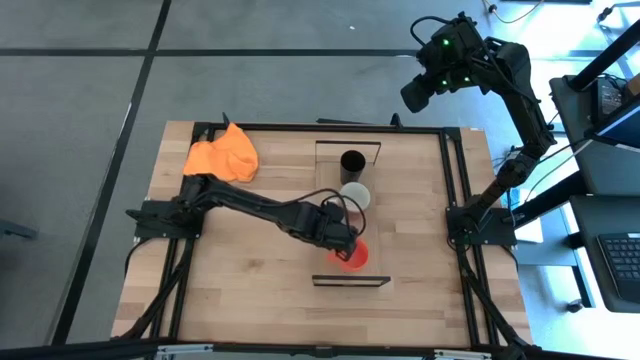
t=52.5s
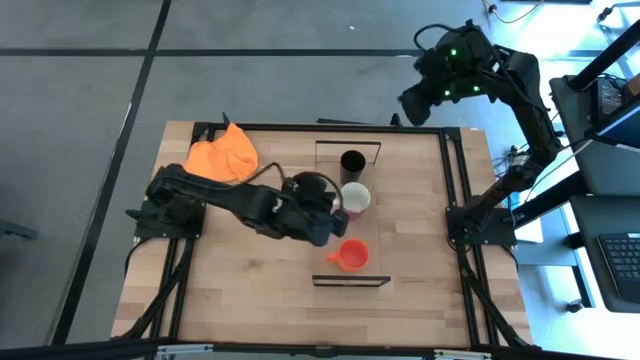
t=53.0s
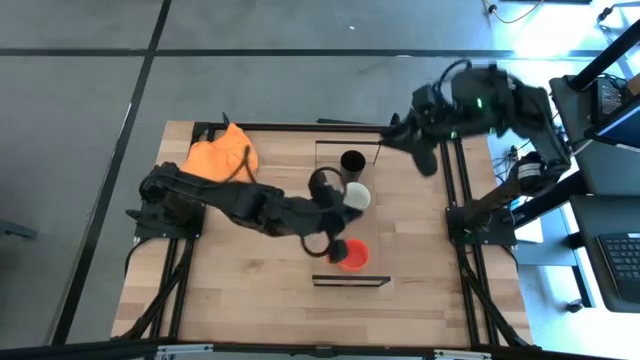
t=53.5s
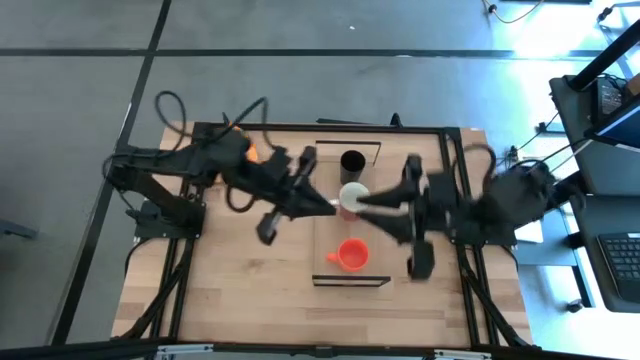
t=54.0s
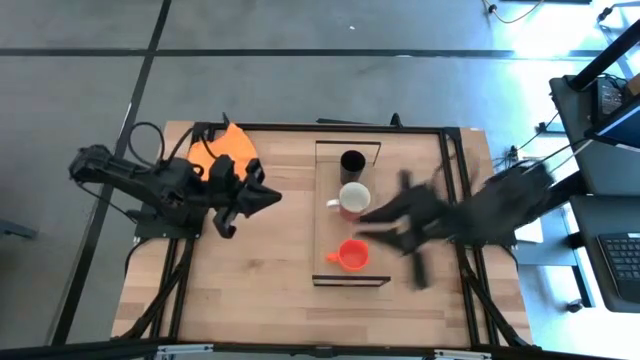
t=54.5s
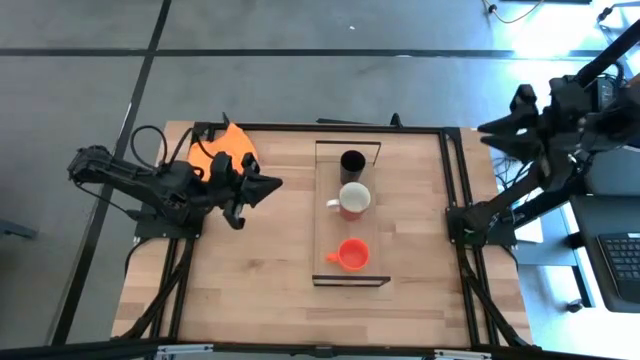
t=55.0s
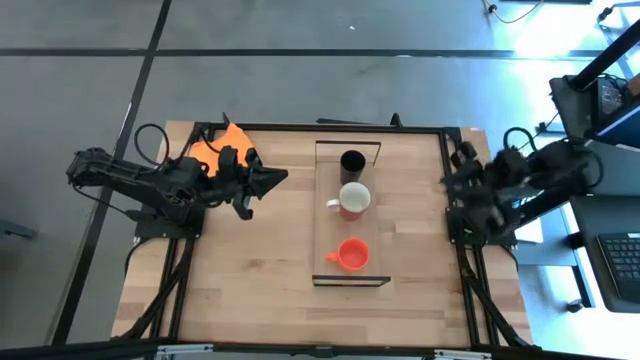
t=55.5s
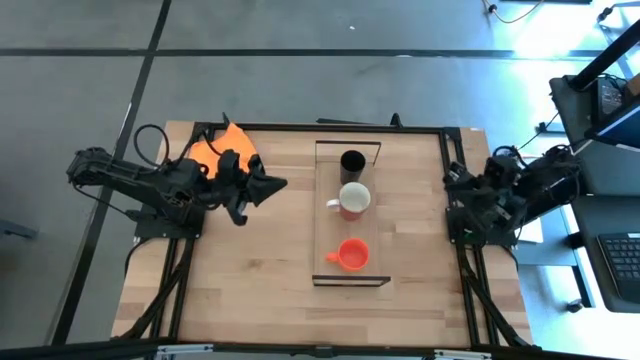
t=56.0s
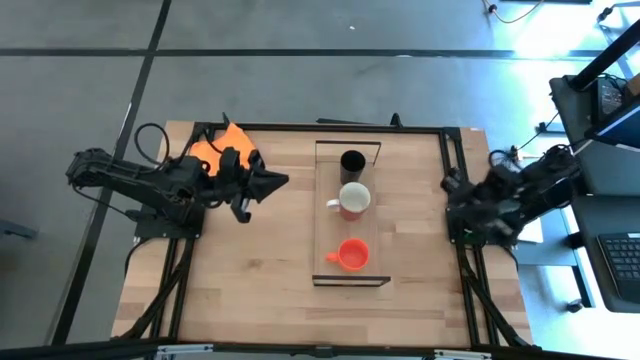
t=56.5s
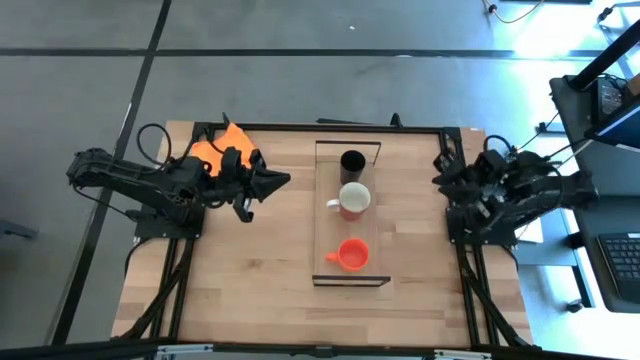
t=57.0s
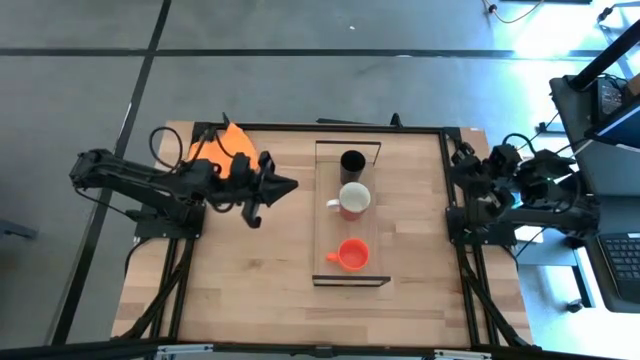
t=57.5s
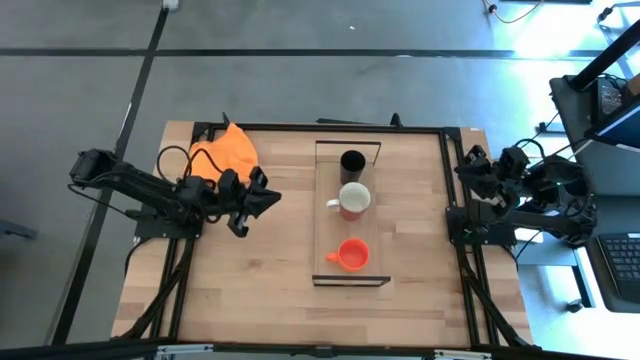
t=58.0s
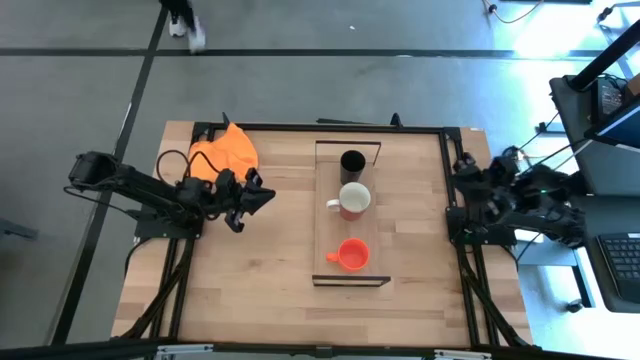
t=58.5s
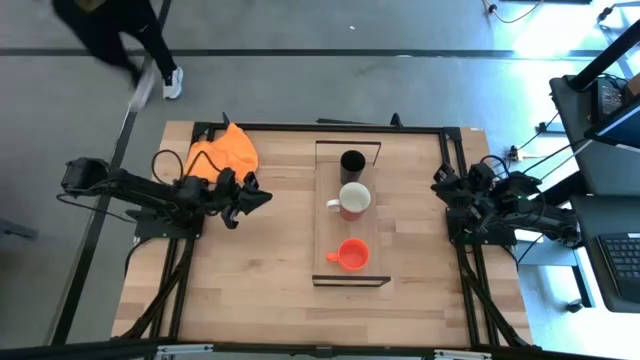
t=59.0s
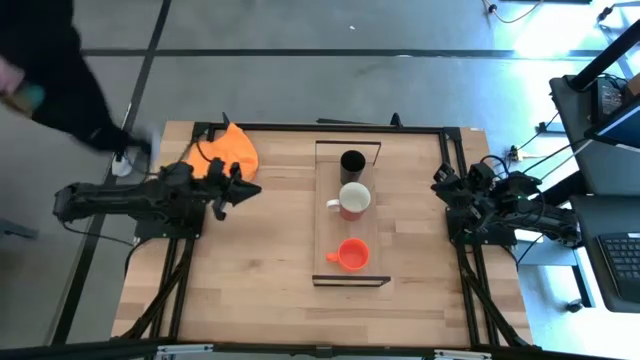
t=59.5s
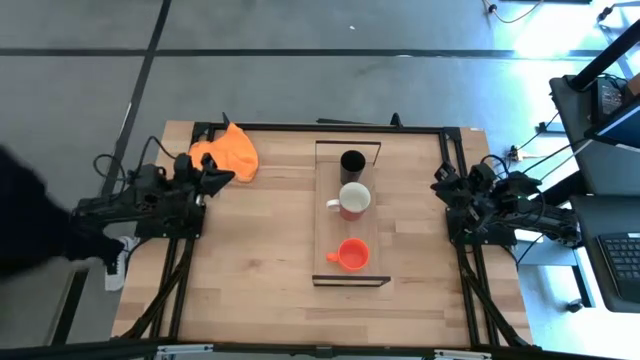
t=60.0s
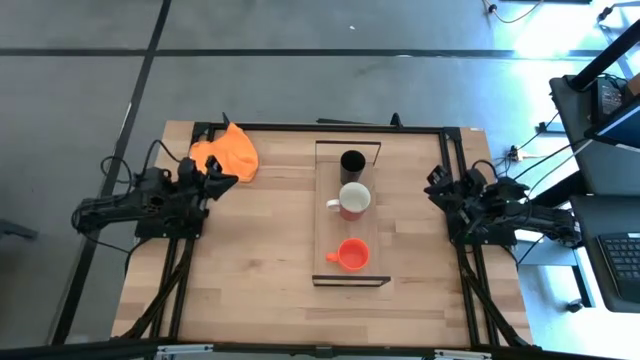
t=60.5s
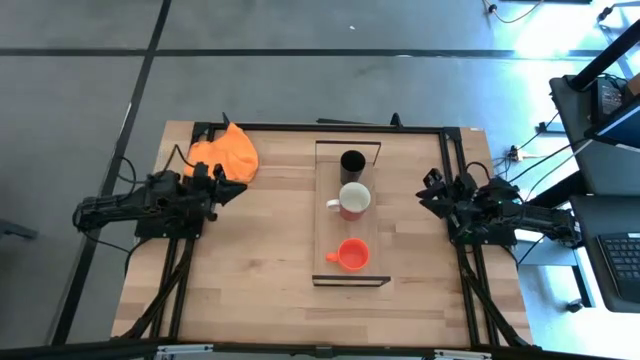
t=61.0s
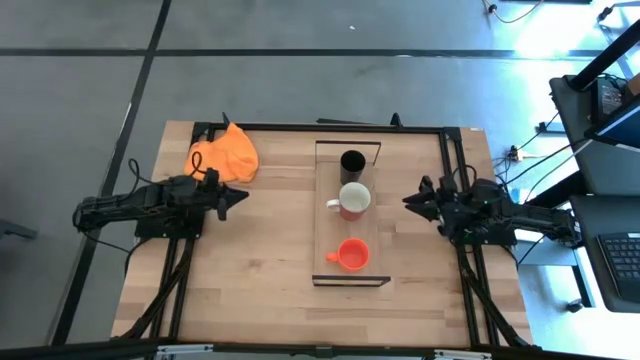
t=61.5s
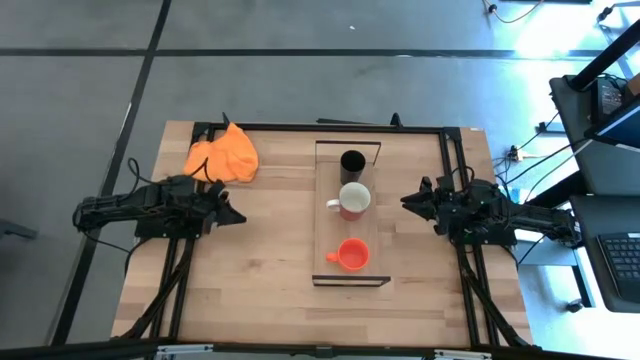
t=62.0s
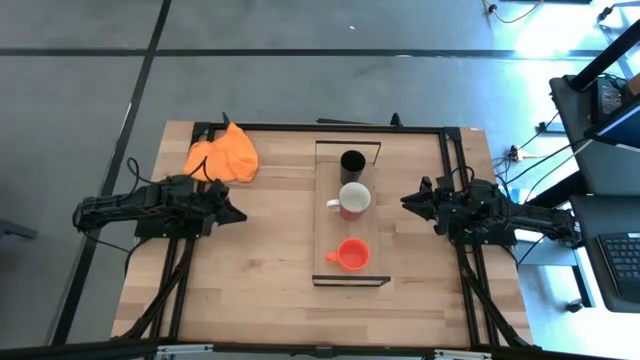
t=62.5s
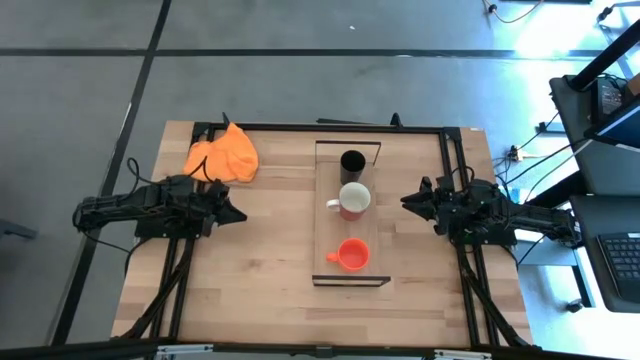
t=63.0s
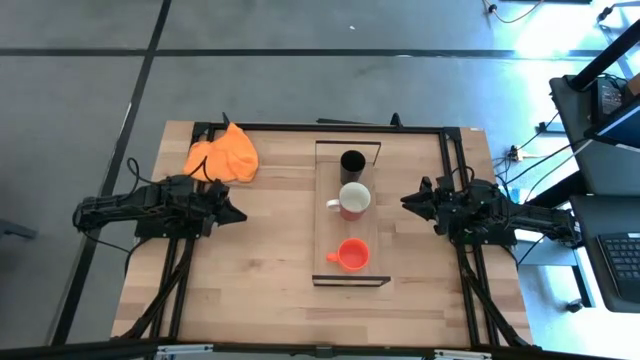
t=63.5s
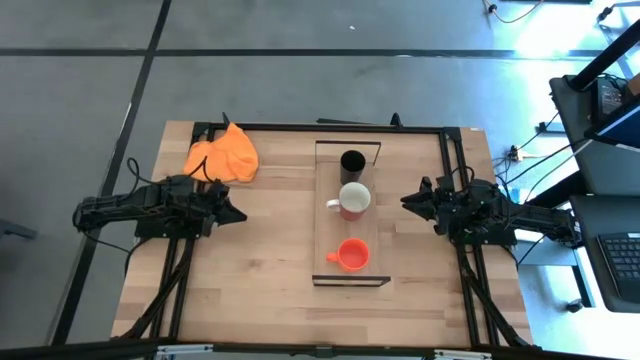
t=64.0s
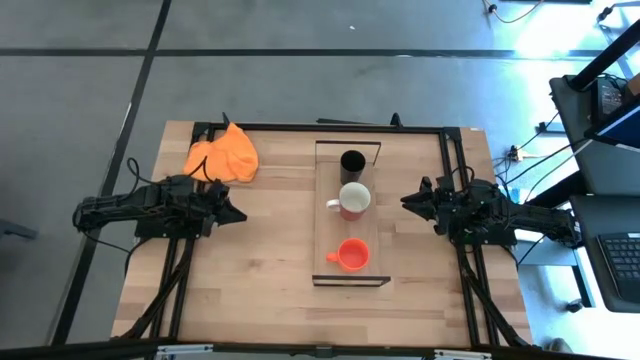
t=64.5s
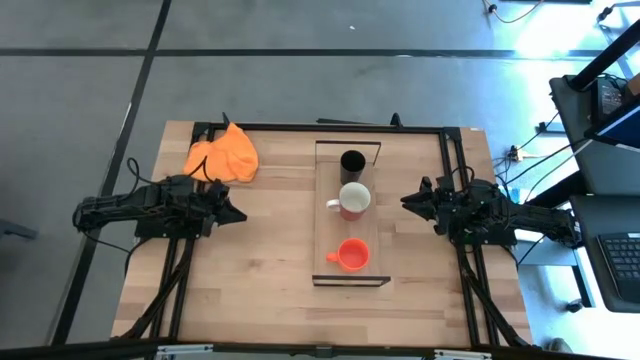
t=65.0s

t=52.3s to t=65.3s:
Task: Stack small to large cups/mugs on shelf
Return to Home Position

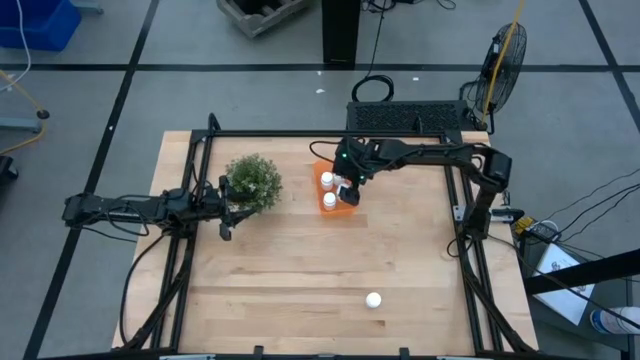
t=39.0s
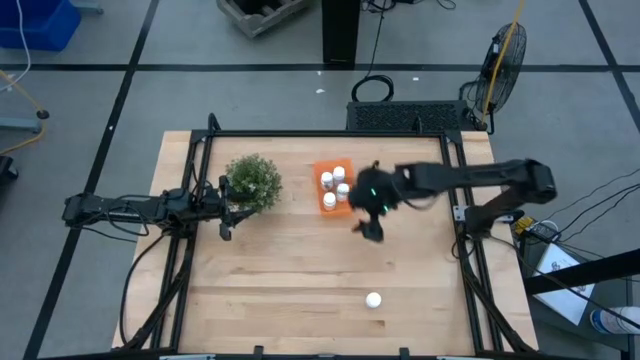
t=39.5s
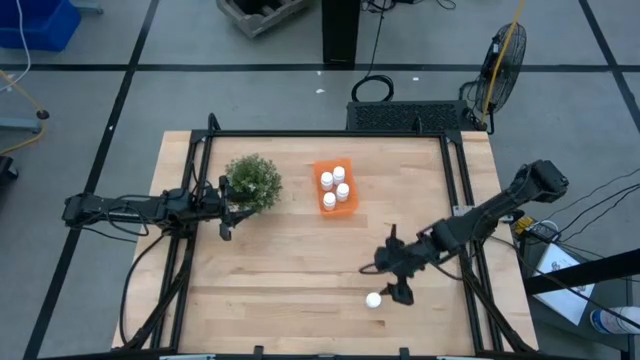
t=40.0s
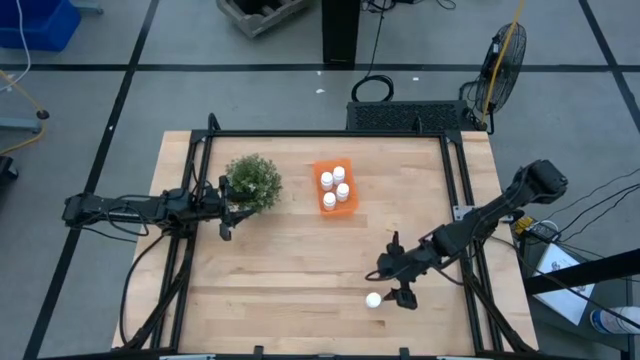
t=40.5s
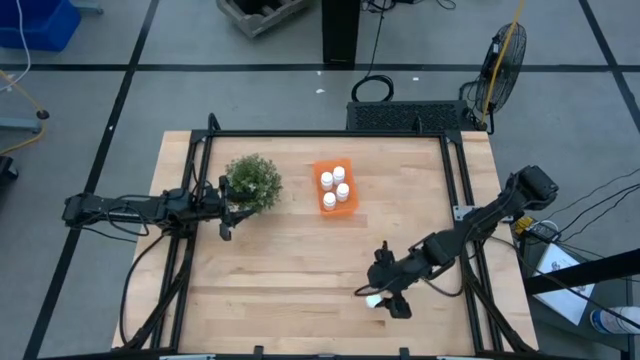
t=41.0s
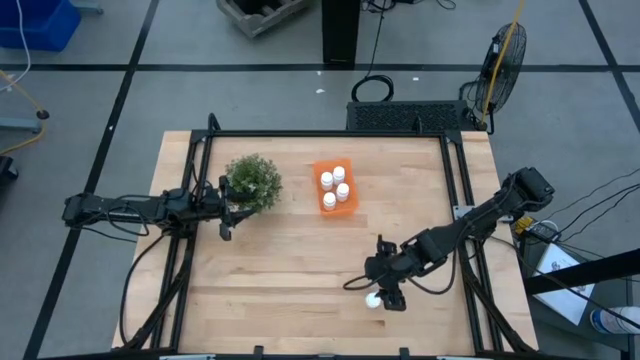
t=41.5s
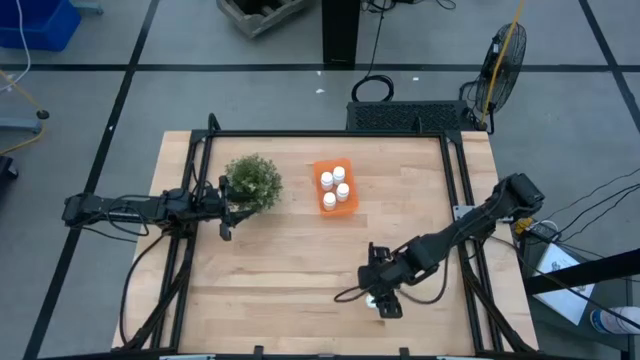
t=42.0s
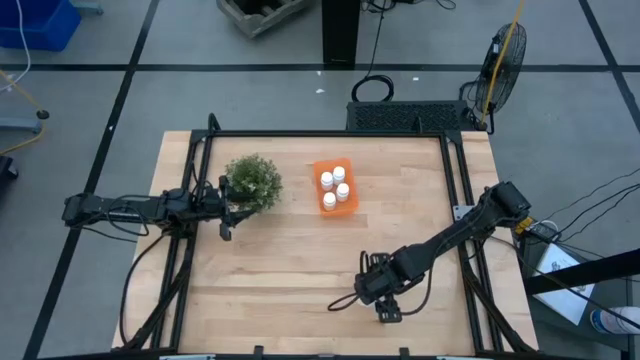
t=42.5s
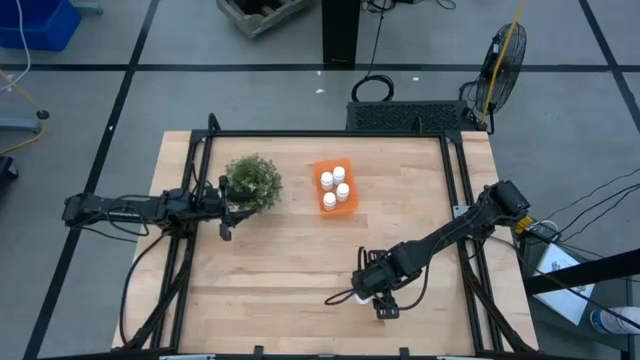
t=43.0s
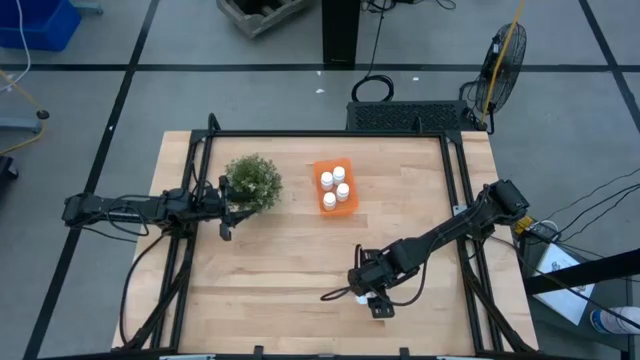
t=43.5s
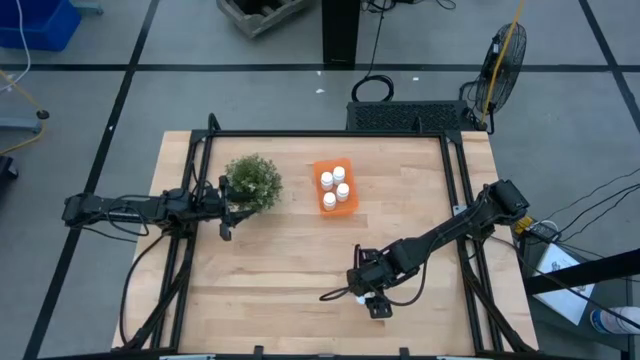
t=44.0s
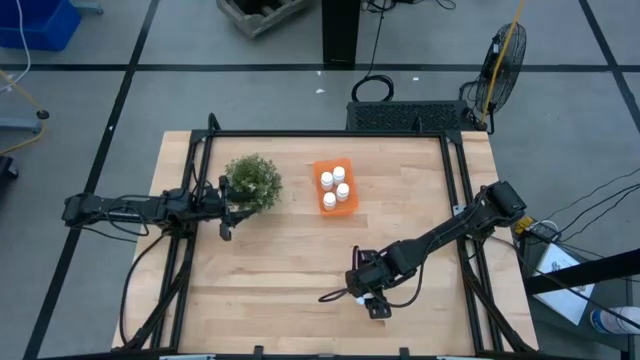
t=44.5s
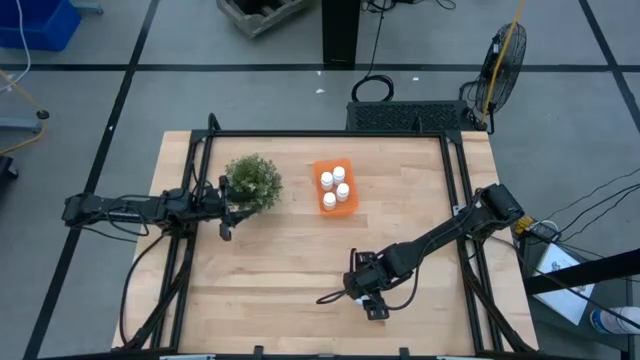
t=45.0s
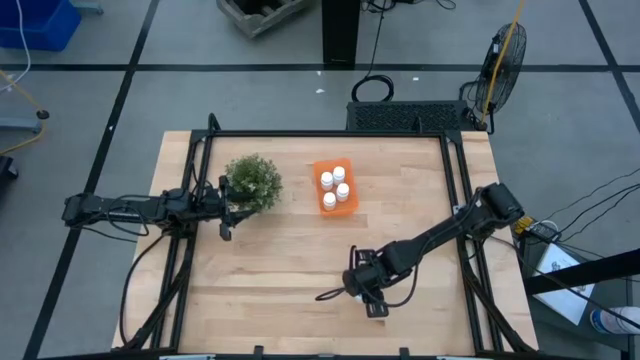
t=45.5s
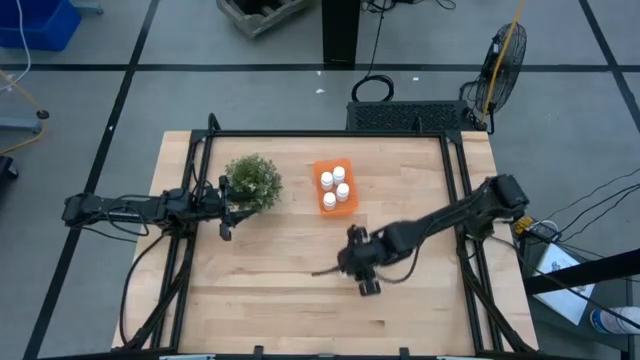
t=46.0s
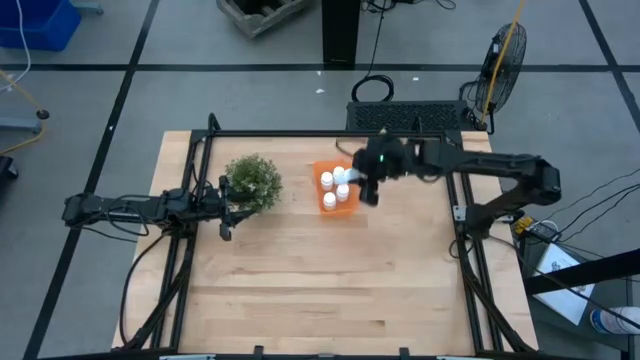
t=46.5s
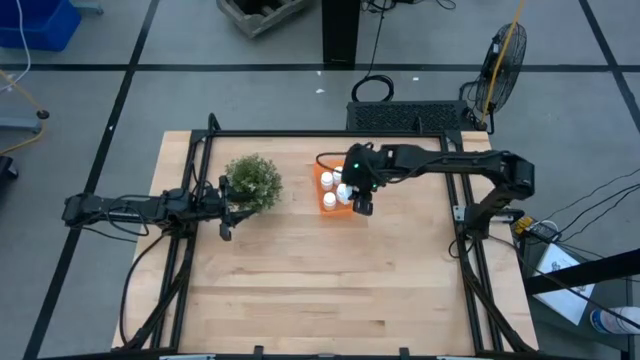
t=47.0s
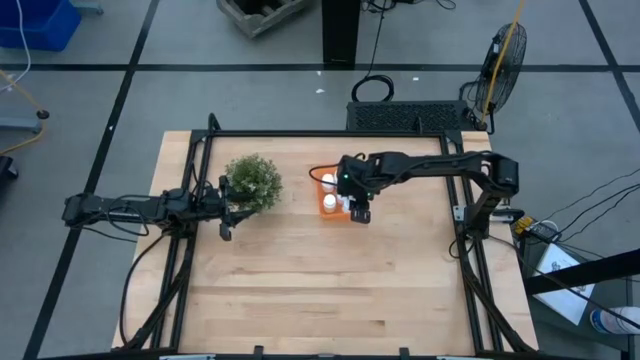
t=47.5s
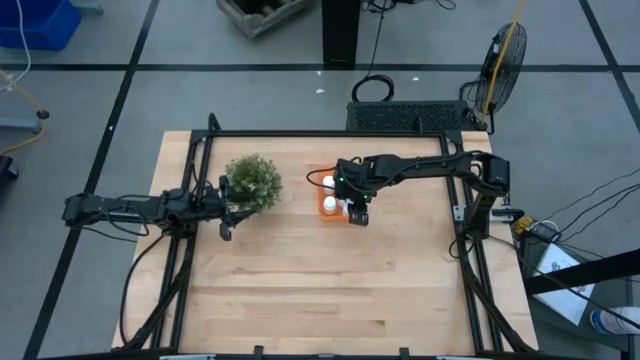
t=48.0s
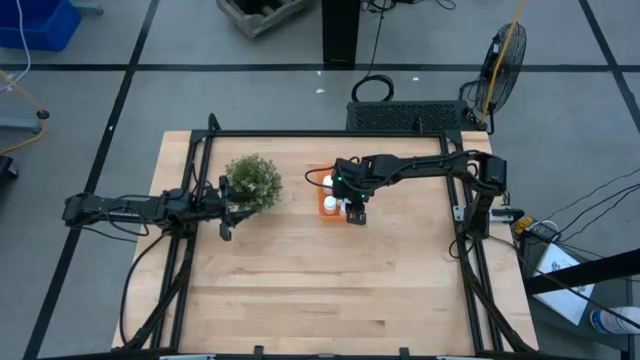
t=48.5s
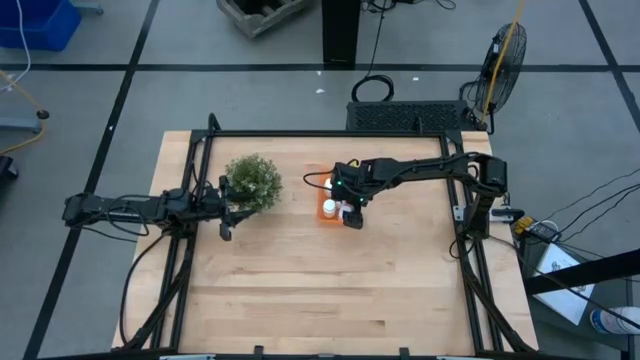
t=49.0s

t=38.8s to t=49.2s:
Task: Pick and place pill bottles into a basket
Put the white pill bottle into the orange bin
